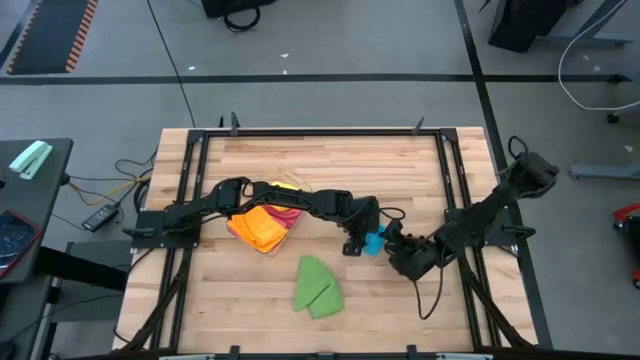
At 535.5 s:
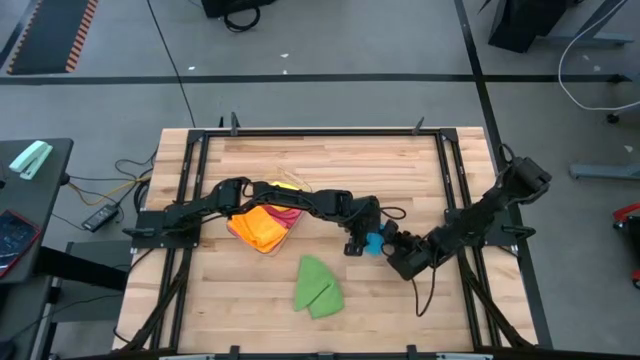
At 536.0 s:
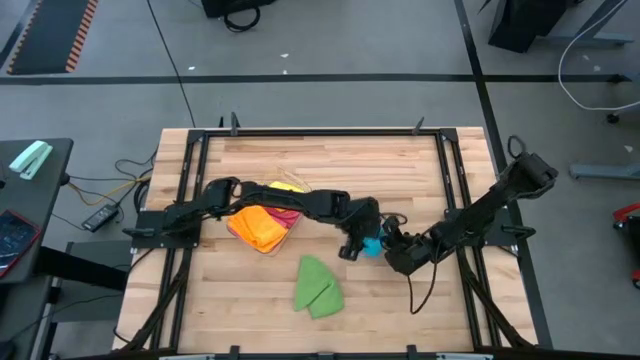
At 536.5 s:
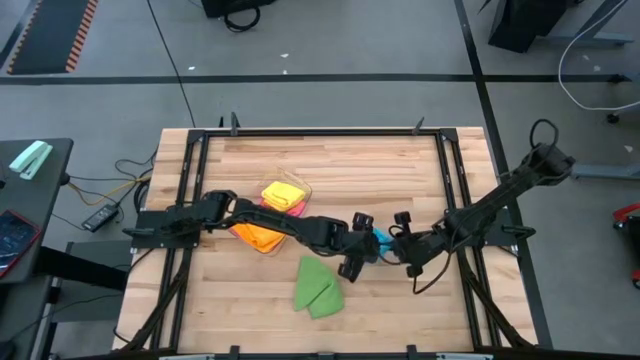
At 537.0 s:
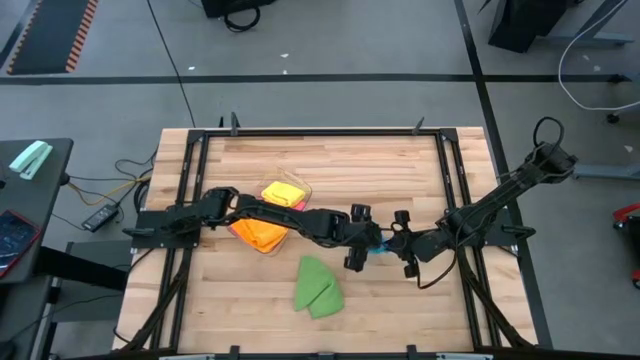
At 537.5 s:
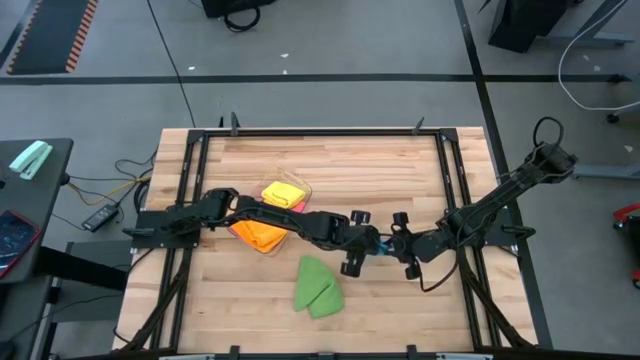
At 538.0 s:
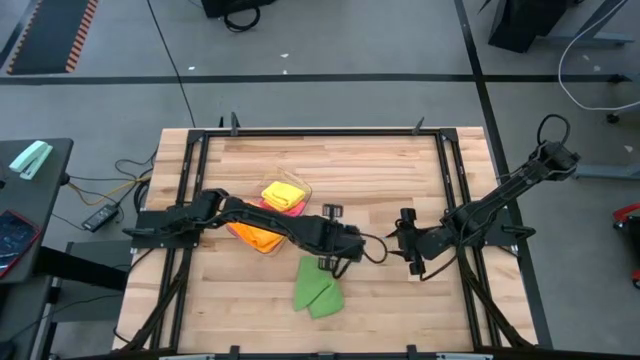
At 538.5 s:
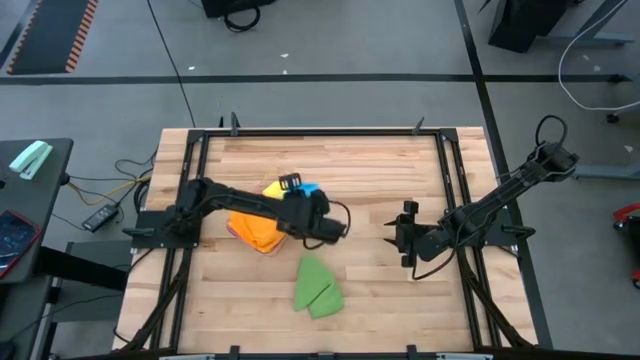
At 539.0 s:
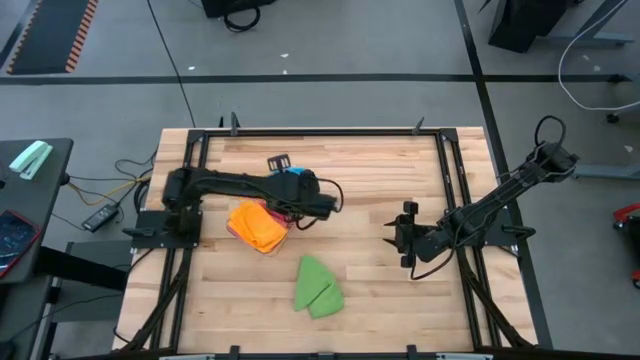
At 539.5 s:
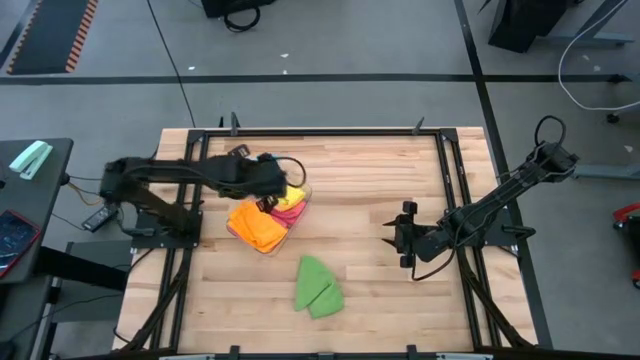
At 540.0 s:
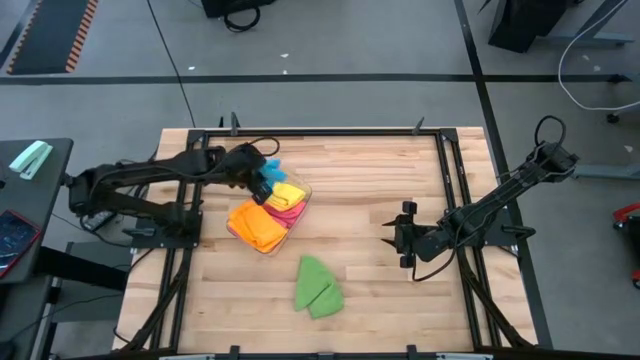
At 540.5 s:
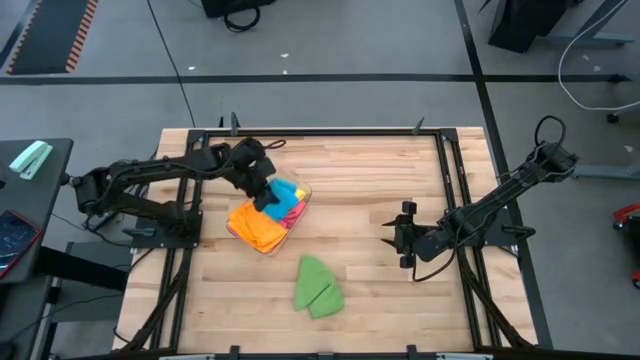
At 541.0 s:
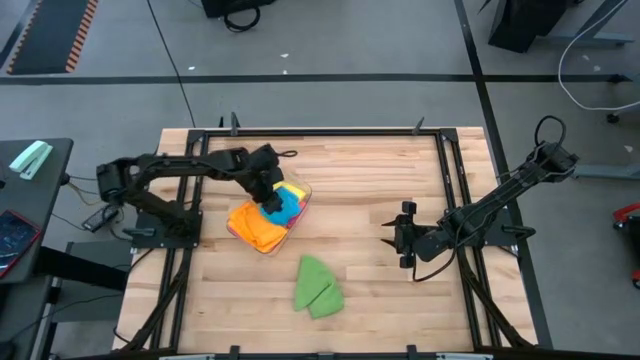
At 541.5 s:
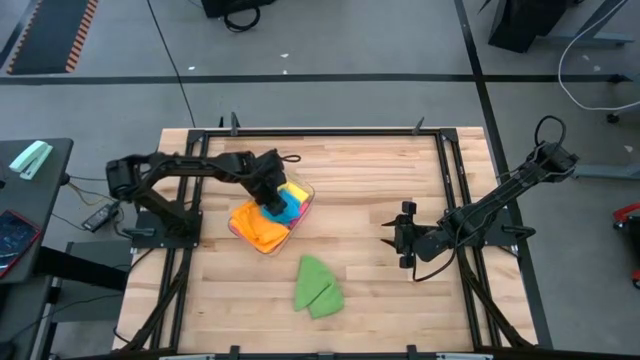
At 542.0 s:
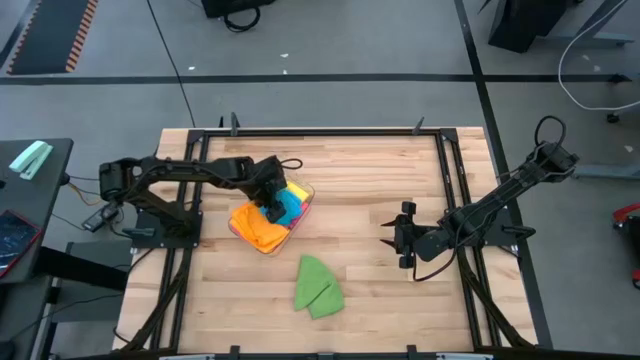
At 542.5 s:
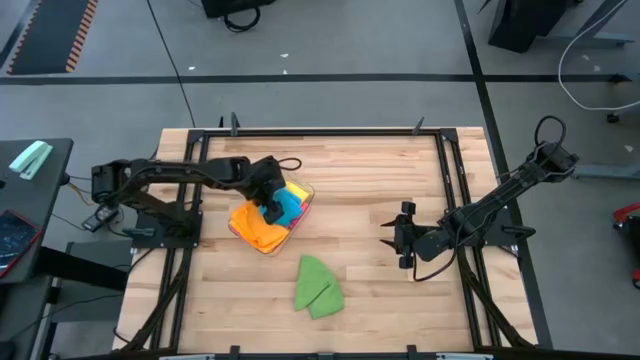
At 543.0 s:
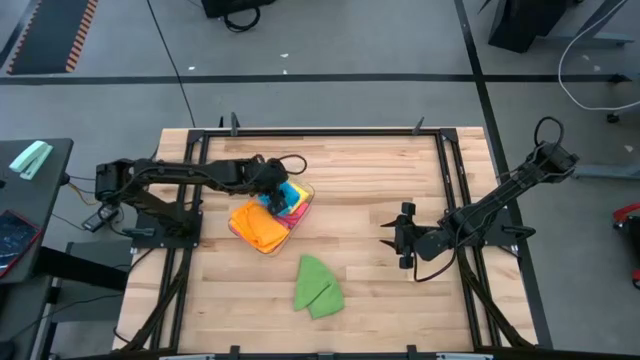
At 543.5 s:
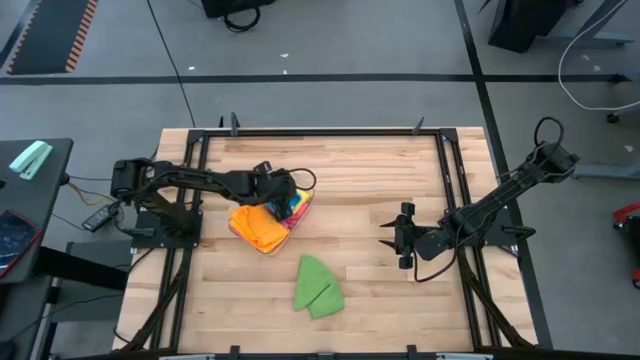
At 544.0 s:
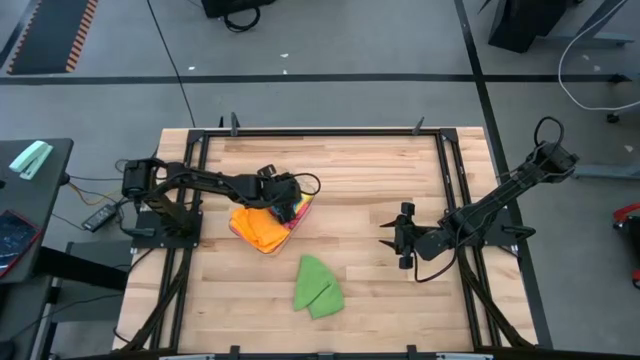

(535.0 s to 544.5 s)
Task: Fold microfiber towels
Put the folded blue microfiber towel into the transparent bin

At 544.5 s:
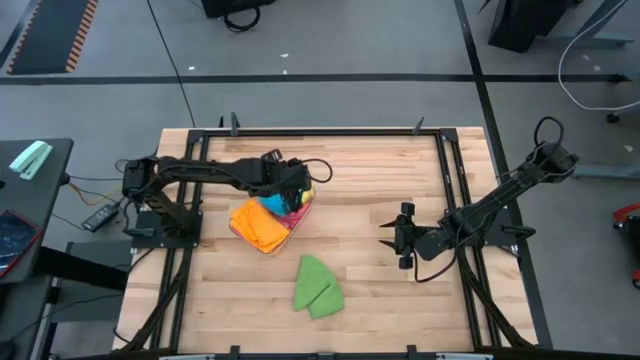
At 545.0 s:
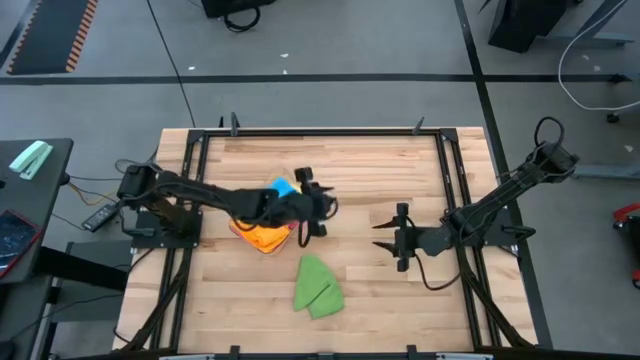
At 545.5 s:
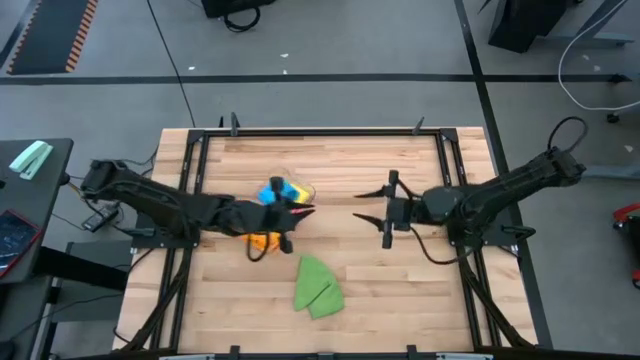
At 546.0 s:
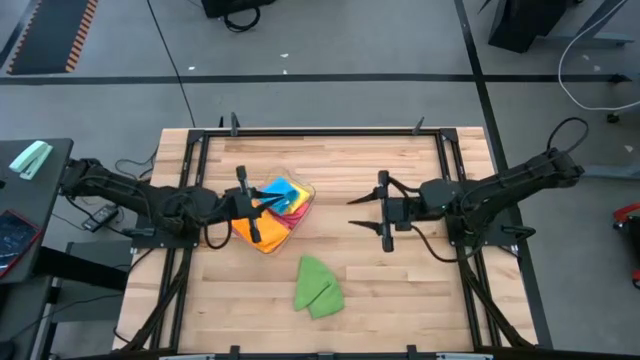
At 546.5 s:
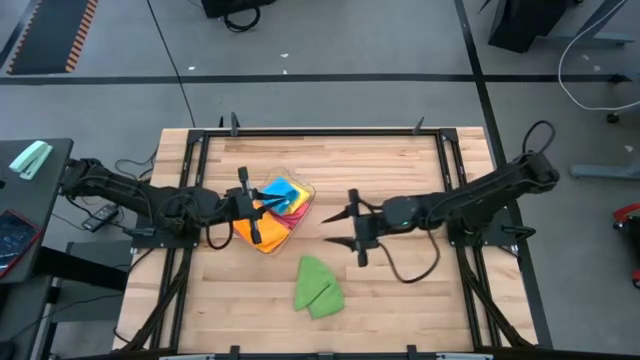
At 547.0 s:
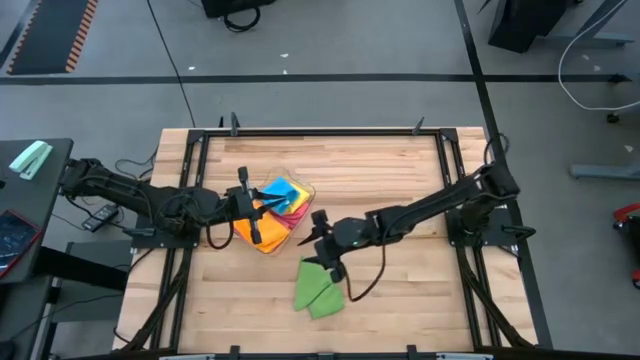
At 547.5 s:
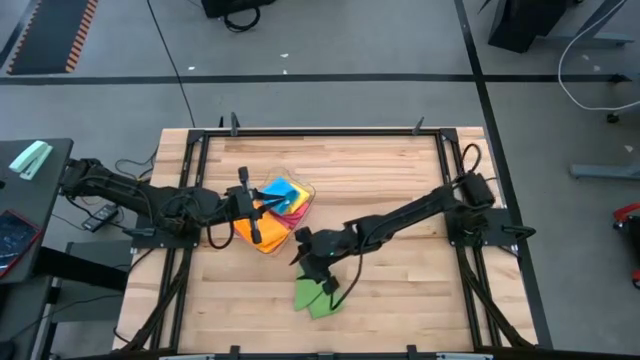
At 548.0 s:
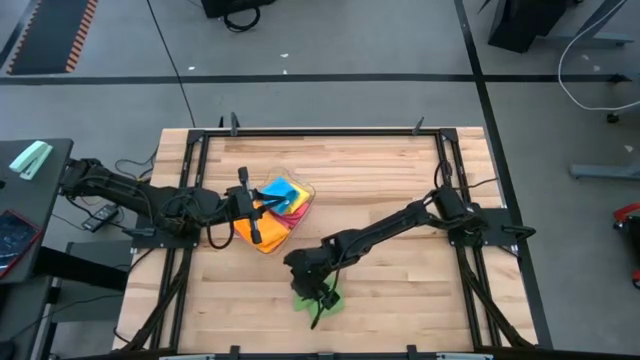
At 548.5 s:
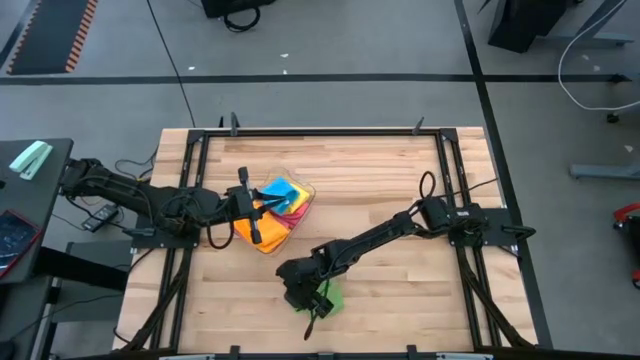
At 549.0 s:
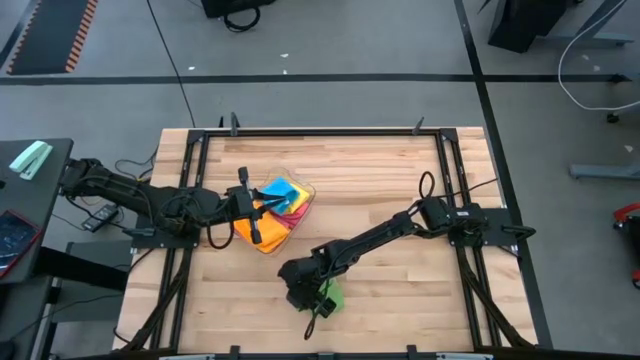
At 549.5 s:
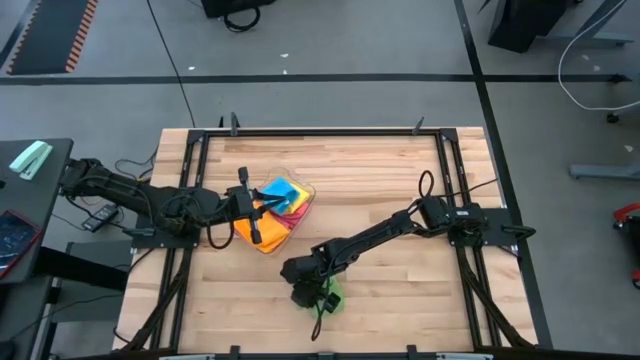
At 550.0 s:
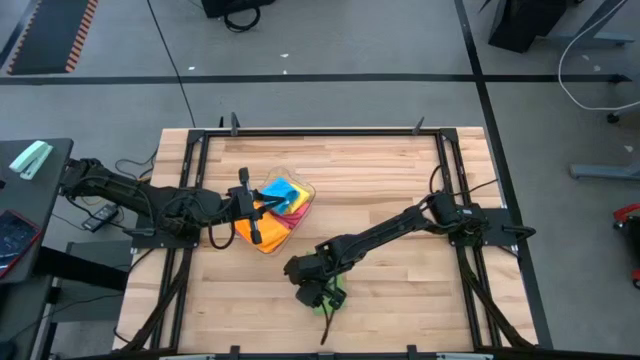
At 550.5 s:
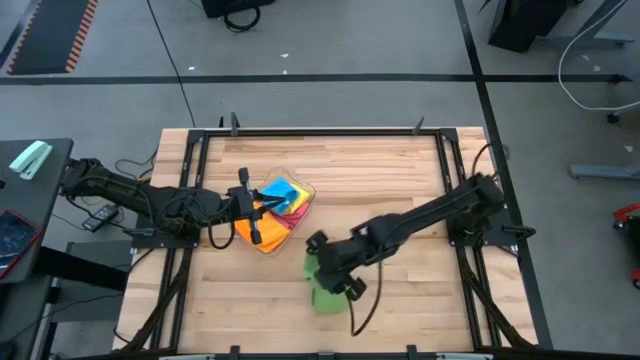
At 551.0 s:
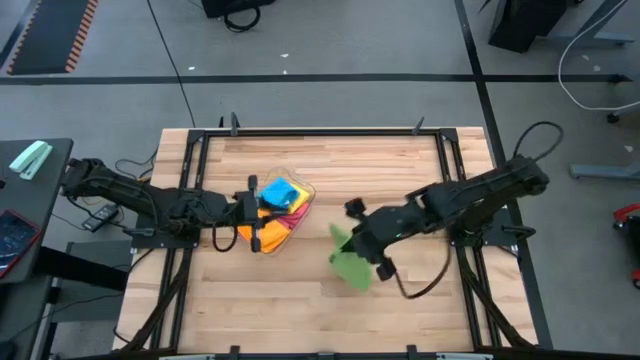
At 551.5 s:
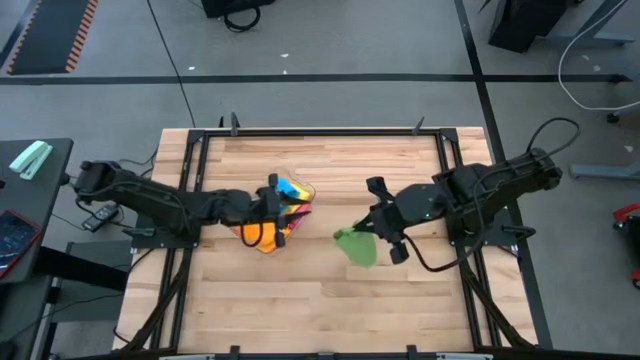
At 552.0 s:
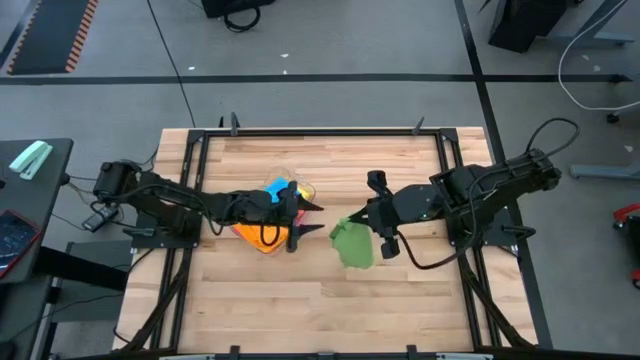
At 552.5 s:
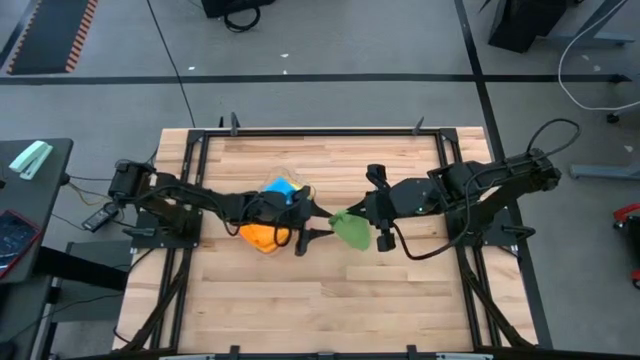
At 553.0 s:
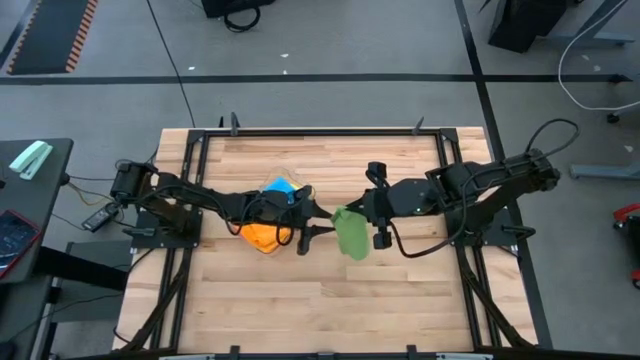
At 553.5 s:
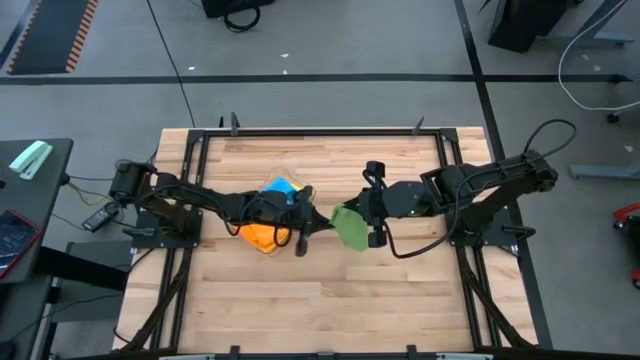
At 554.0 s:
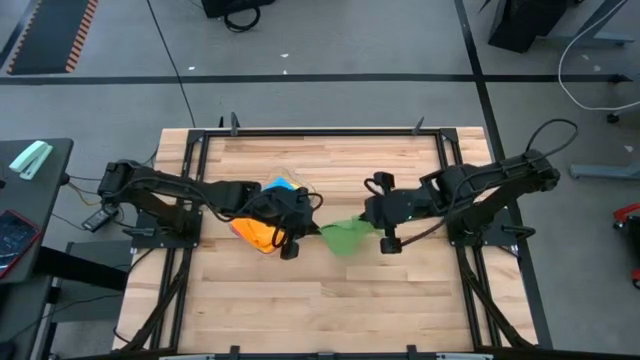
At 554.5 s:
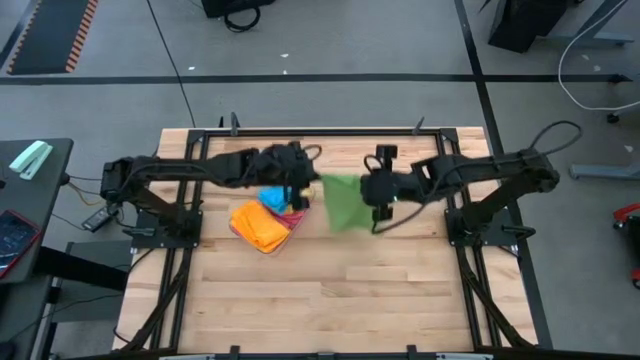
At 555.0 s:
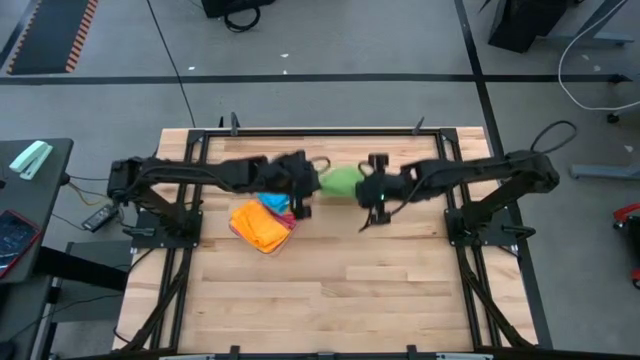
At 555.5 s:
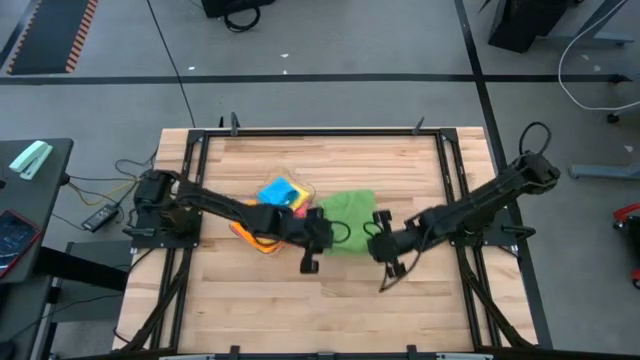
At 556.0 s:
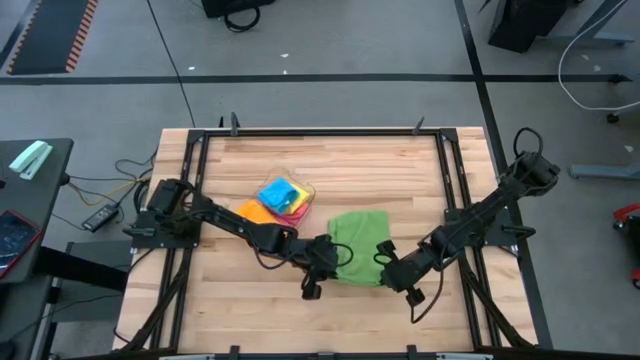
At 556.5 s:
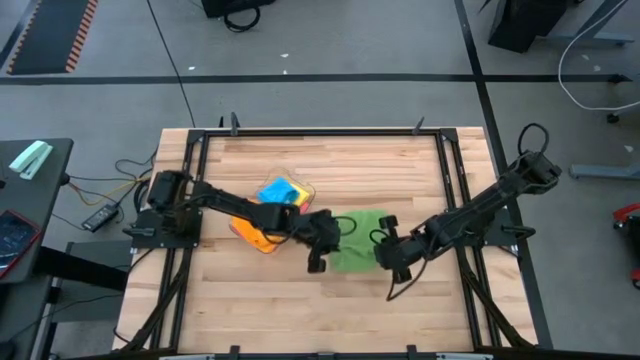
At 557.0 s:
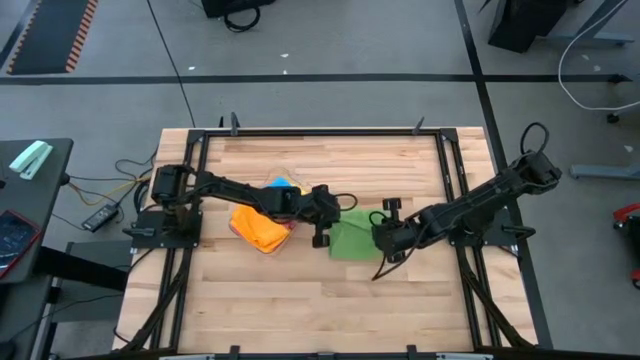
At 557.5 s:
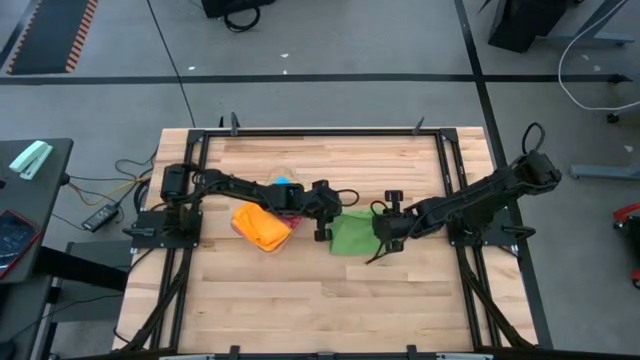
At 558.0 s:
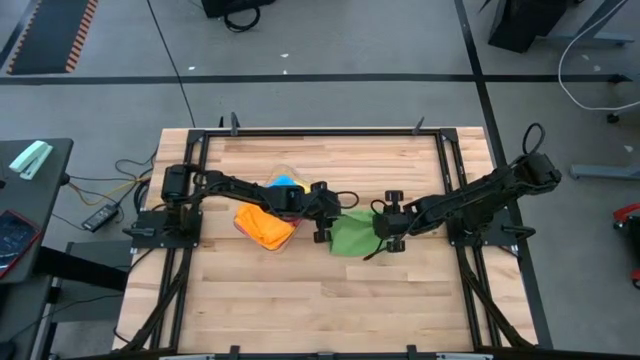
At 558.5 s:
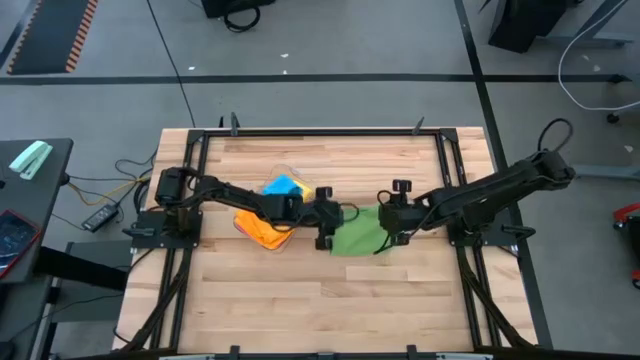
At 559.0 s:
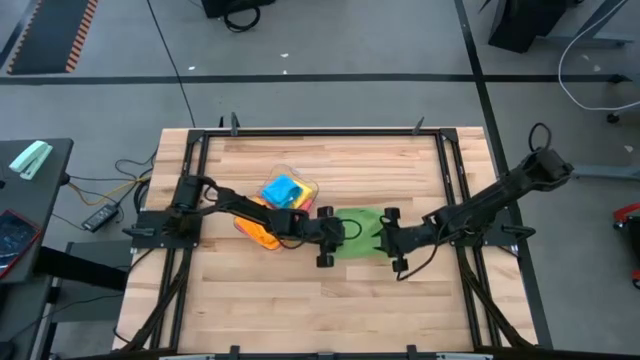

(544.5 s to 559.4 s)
Fold the green microfiber towel
